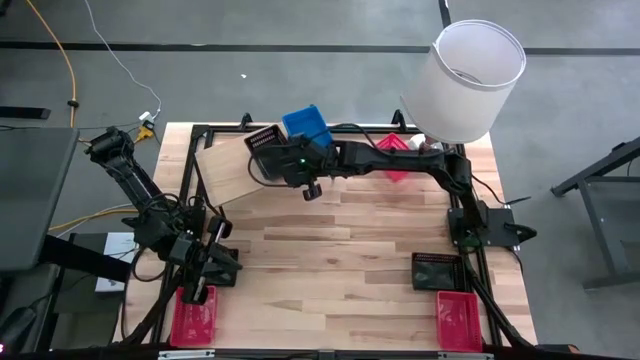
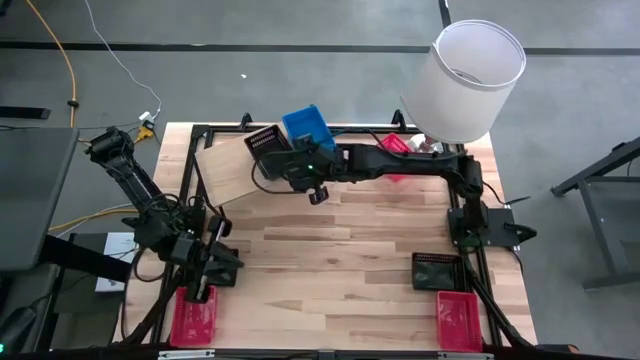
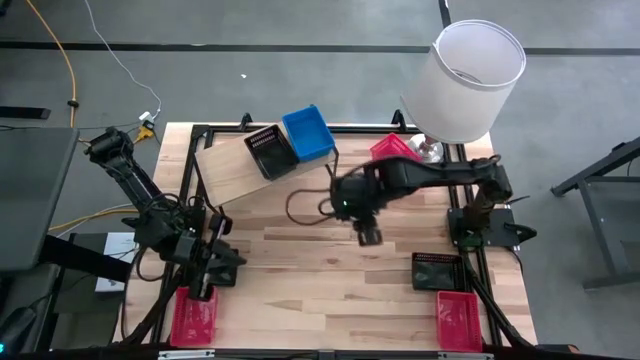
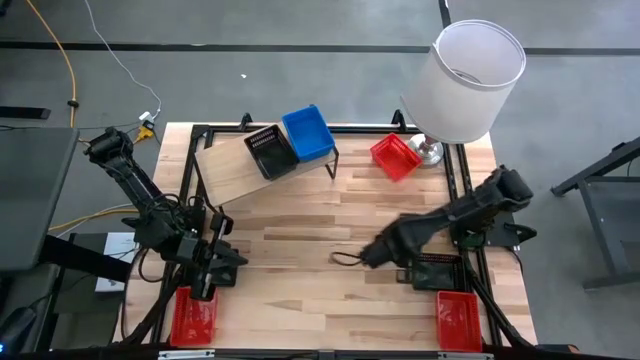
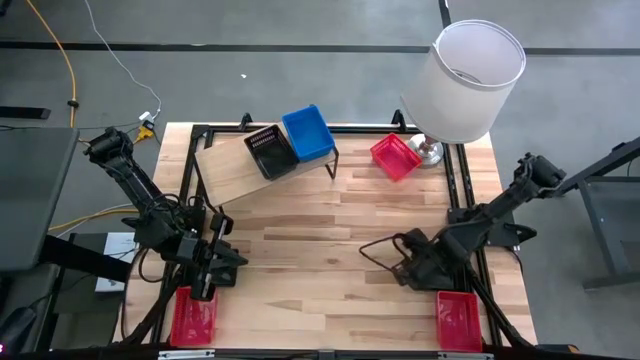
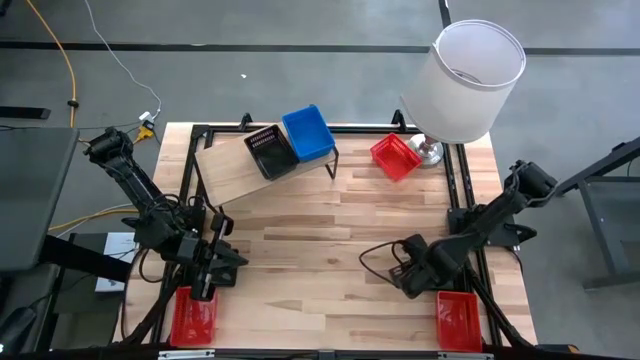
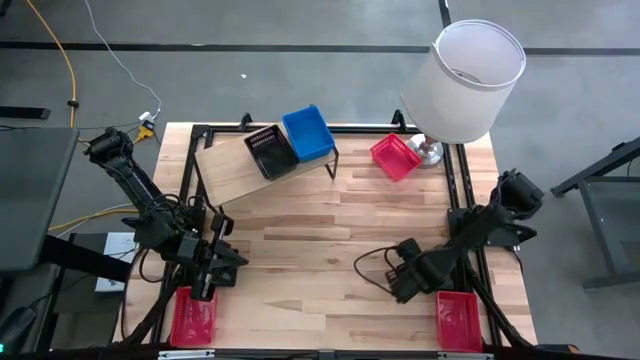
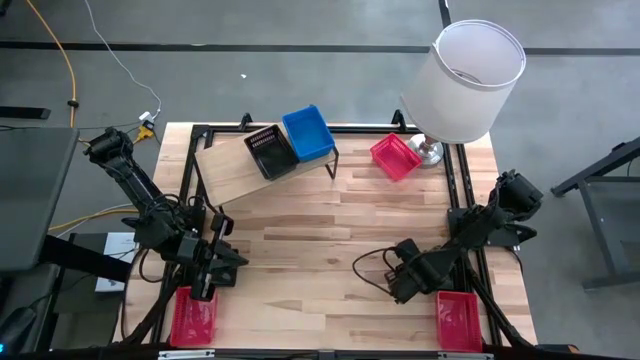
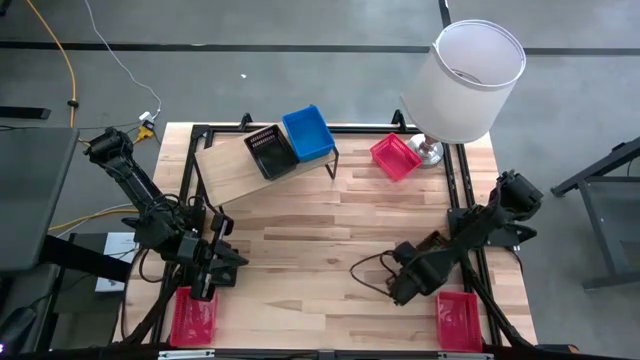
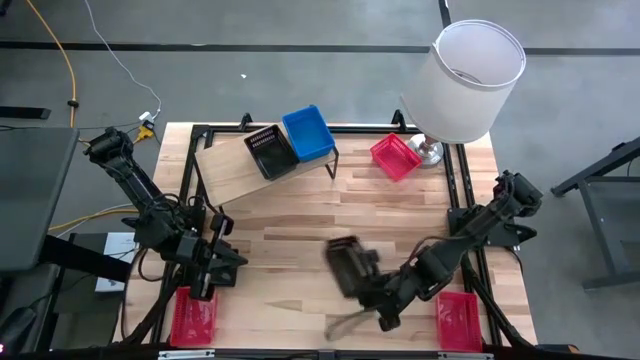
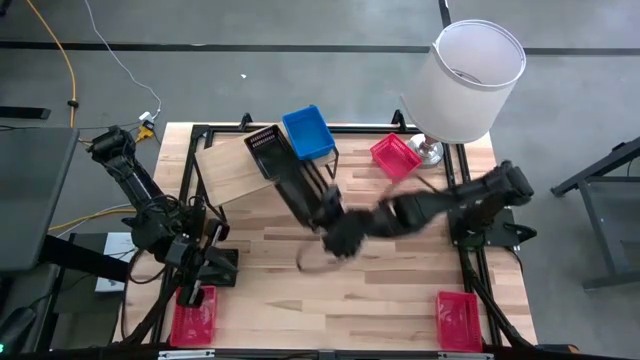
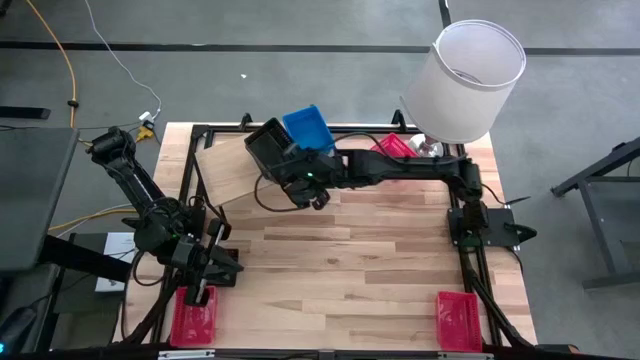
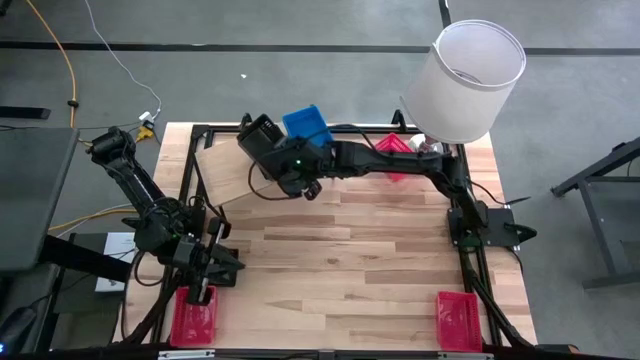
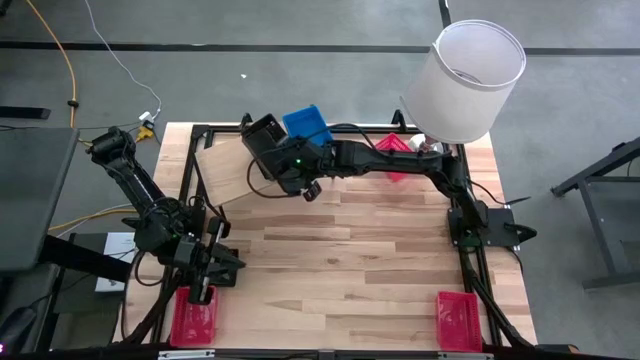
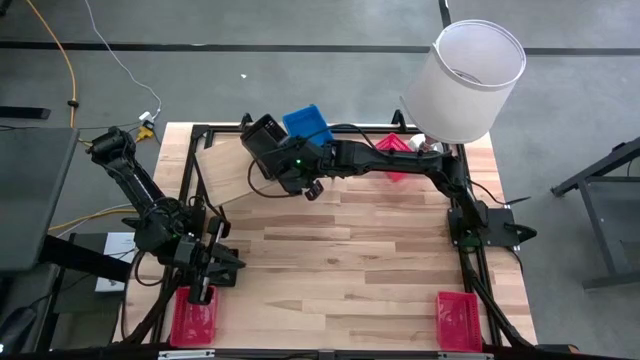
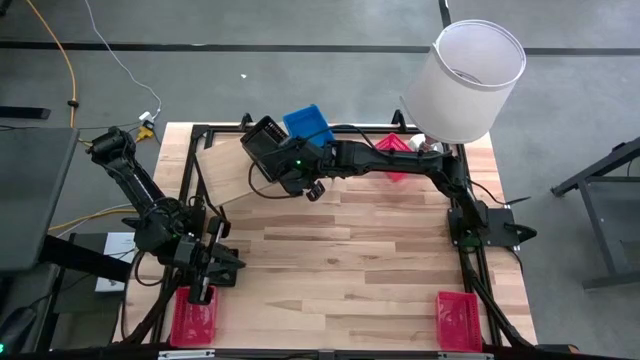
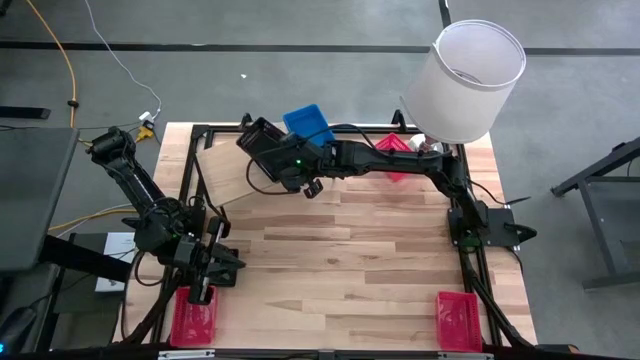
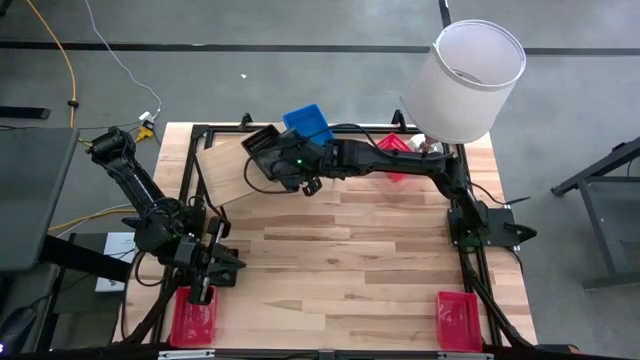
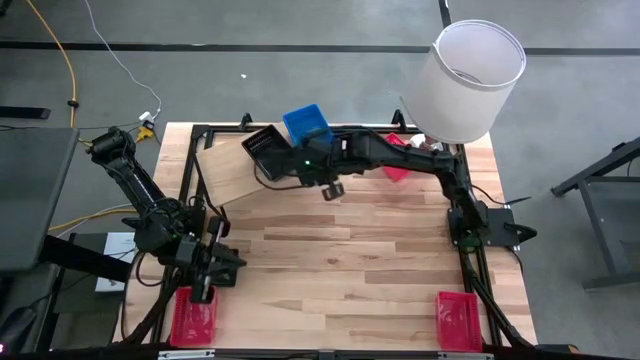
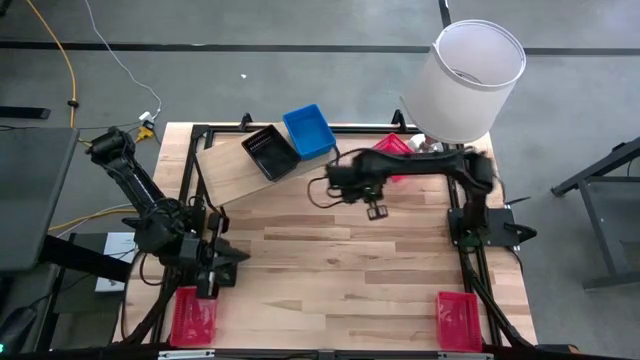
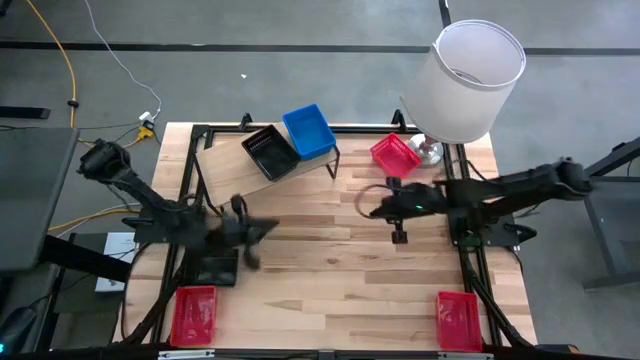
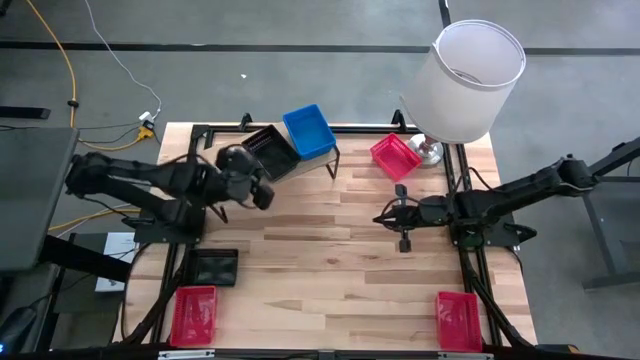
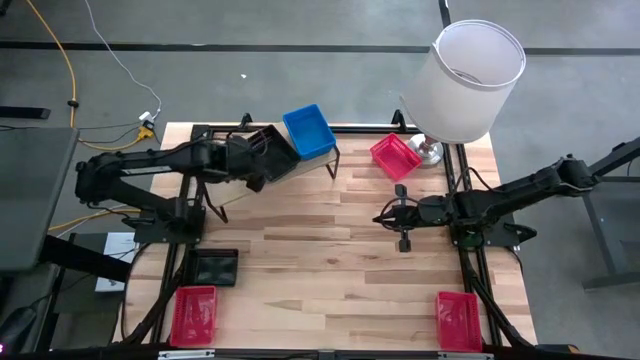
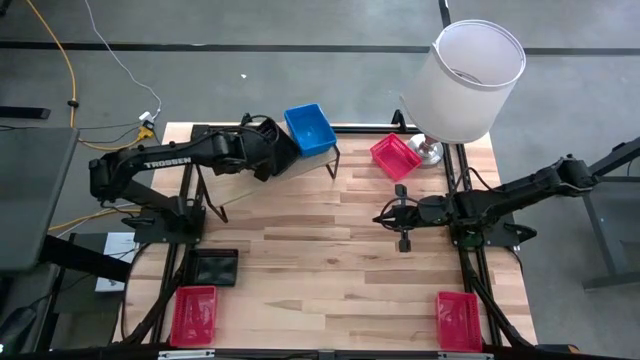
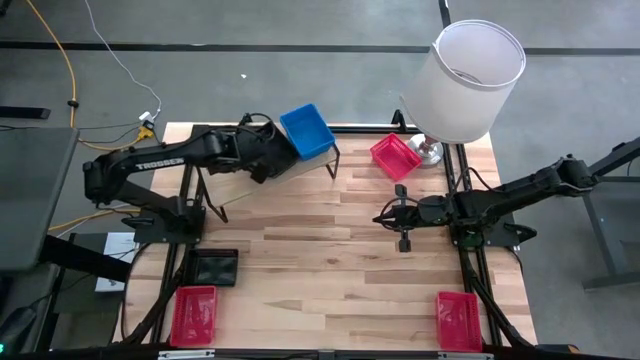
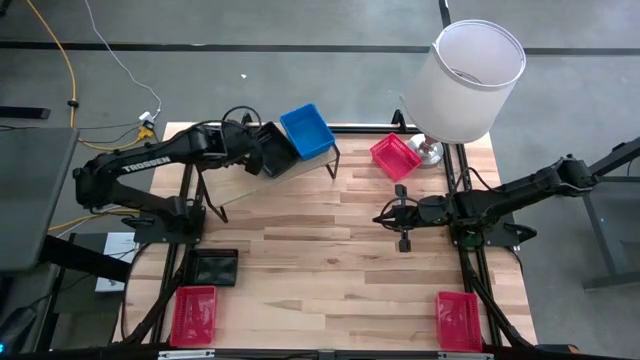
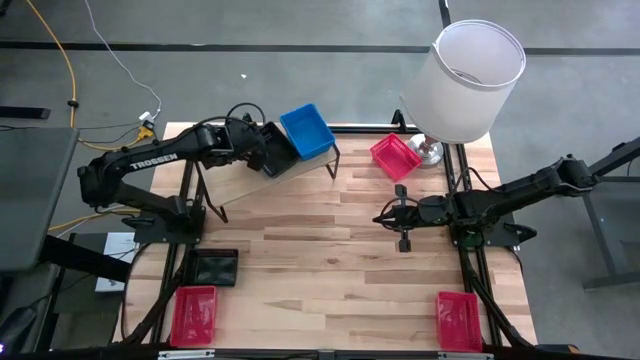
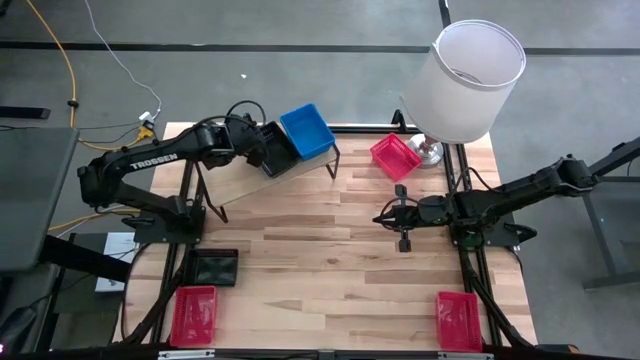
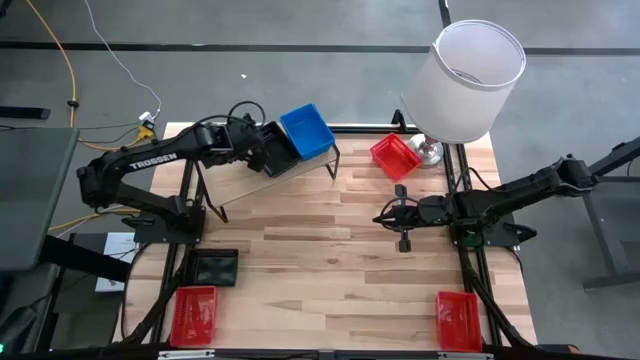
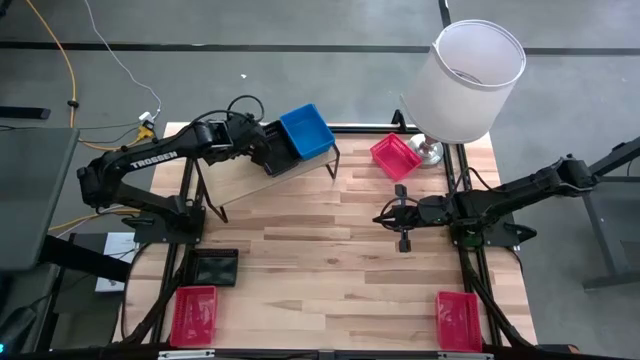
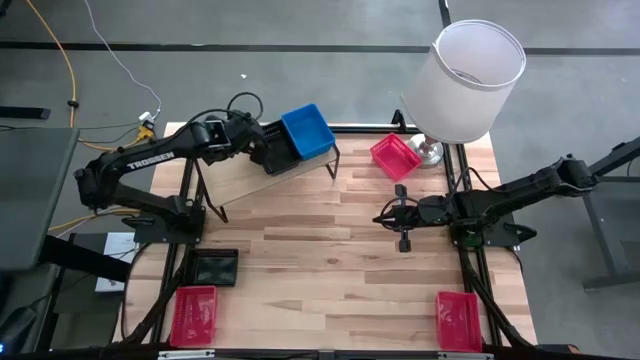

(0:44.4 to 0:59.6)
Task: Stack baskets on shelf by color
Stack the right black bin on top of the other black bin on the shelf

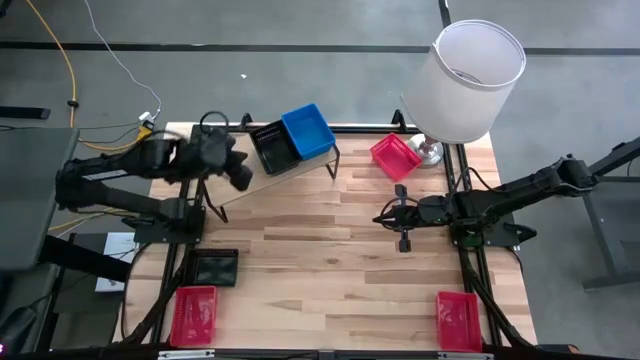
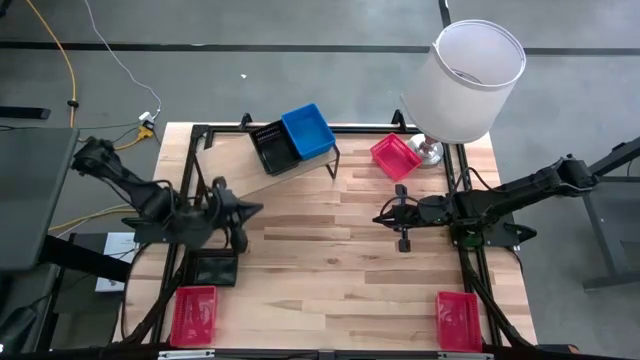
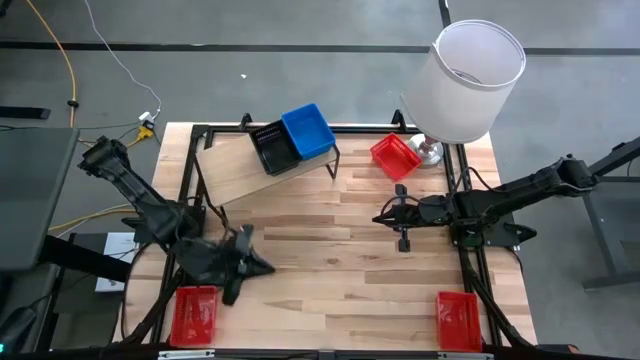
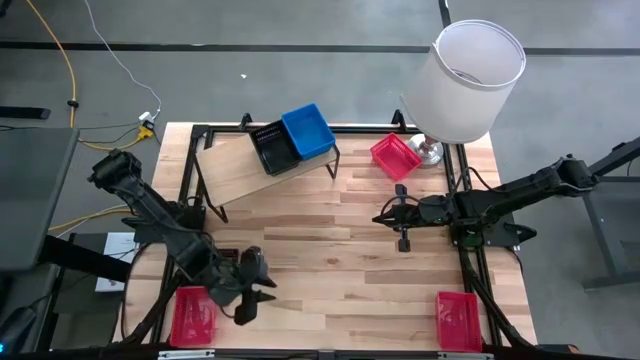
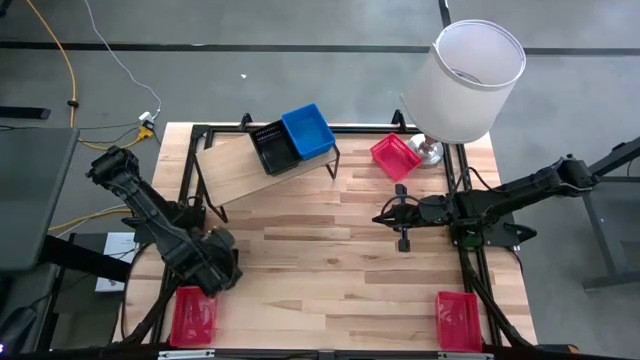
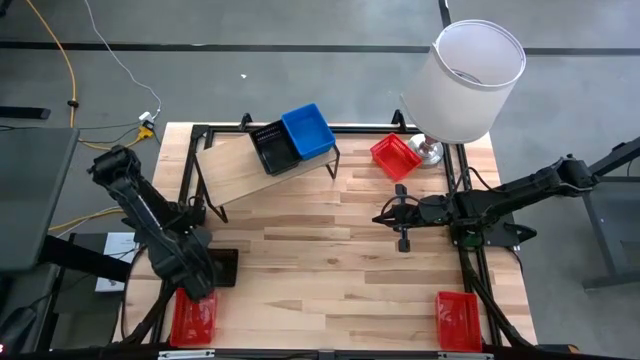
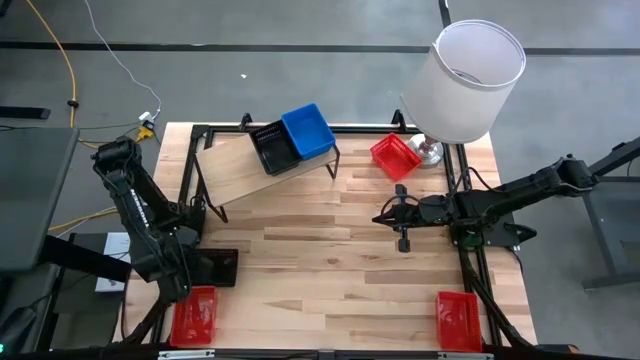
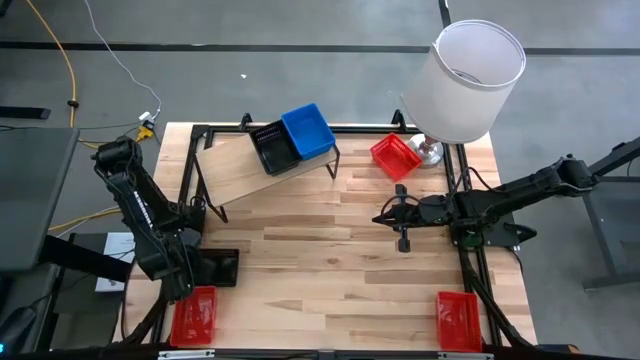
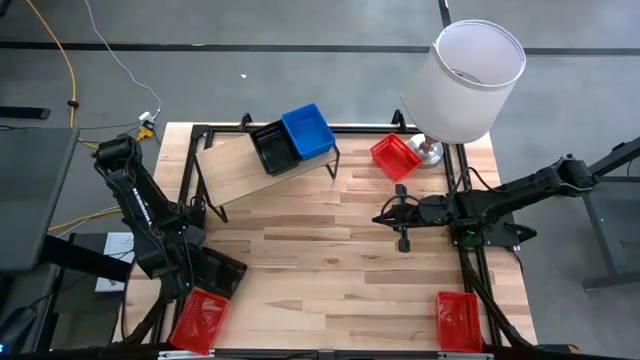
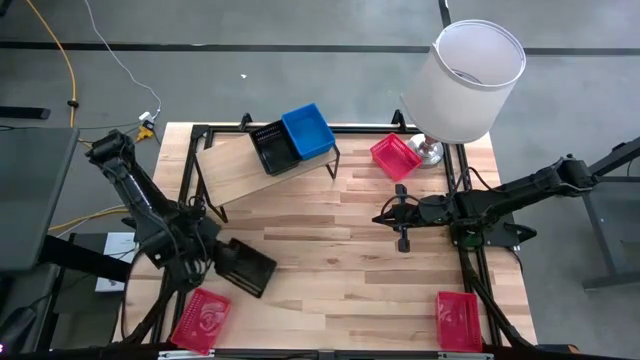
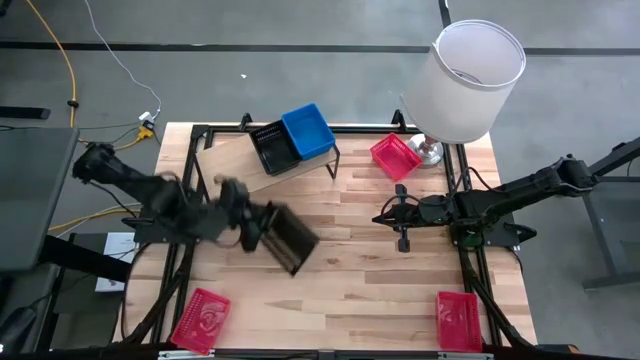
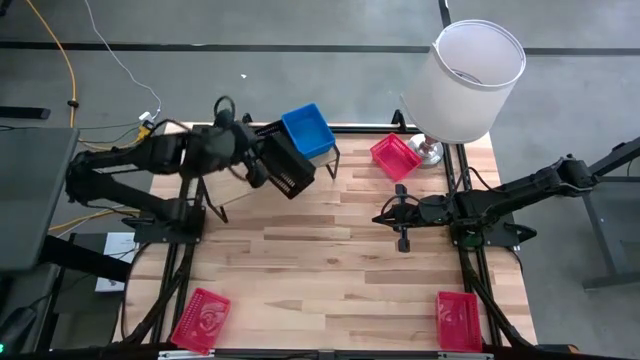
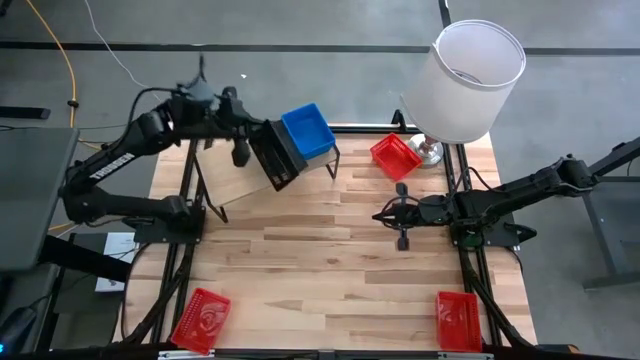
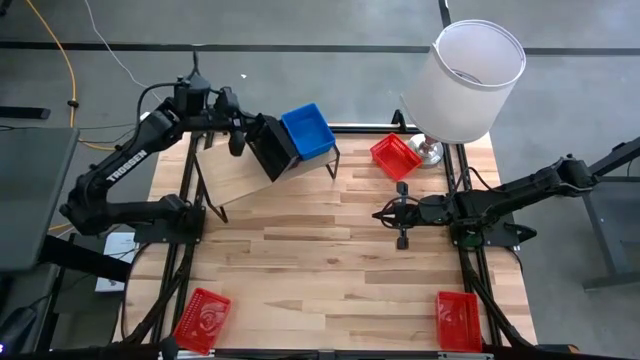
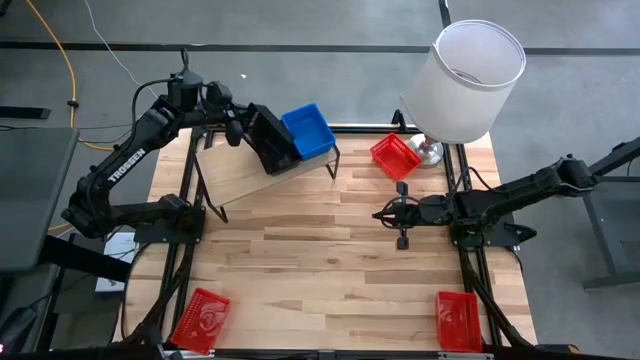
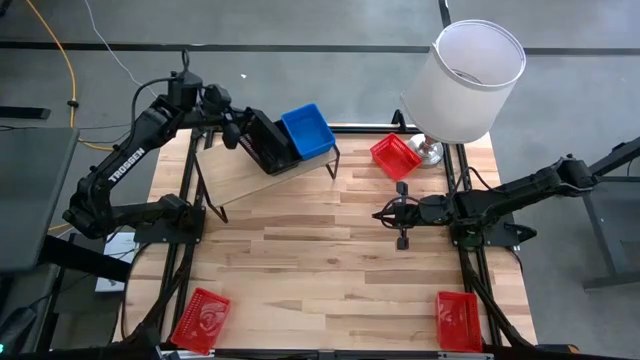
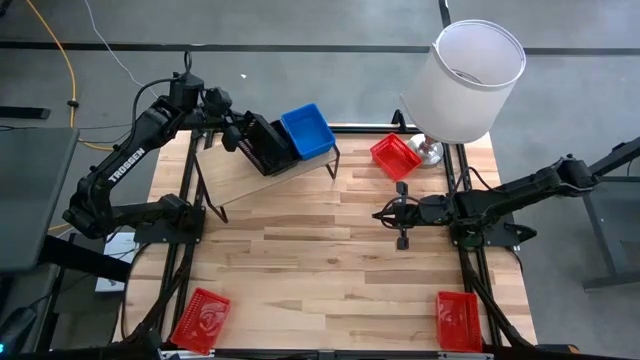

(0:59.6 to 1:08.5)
Stack the black bin on top of the other black bin on the shelf
